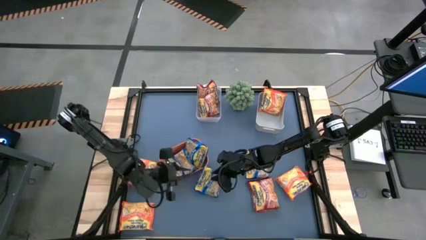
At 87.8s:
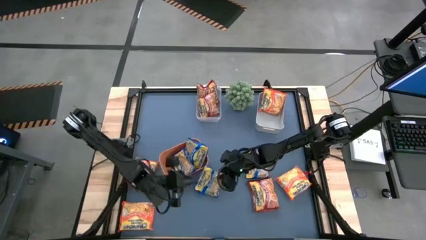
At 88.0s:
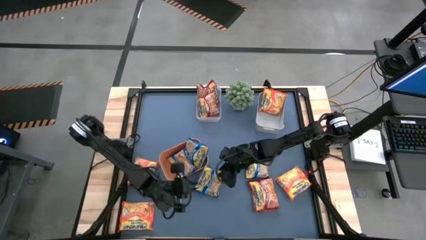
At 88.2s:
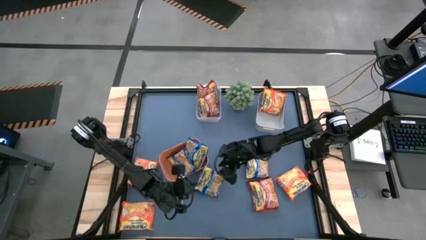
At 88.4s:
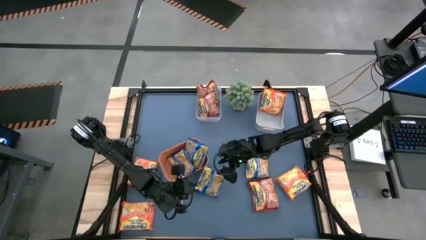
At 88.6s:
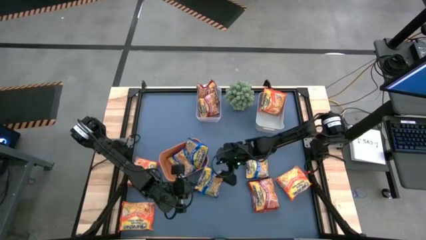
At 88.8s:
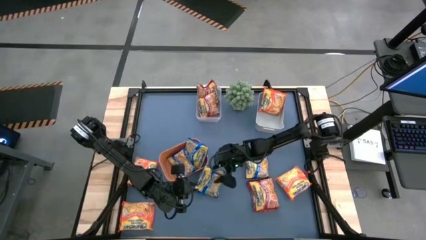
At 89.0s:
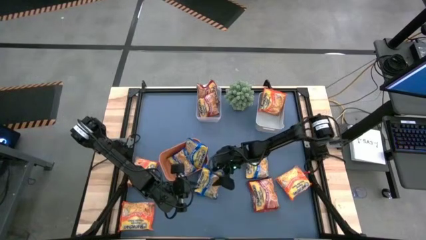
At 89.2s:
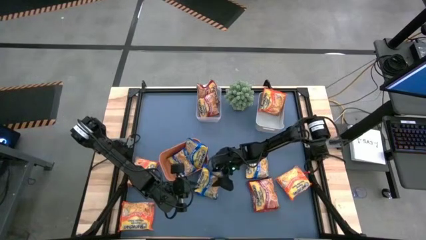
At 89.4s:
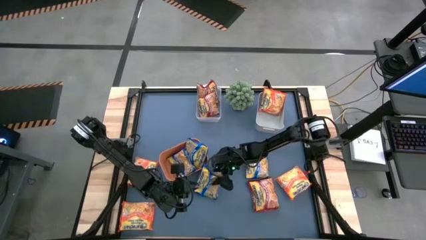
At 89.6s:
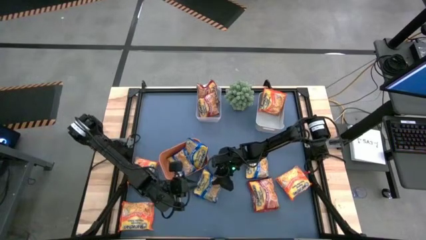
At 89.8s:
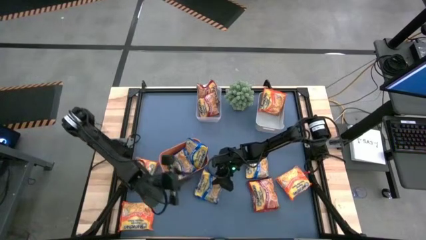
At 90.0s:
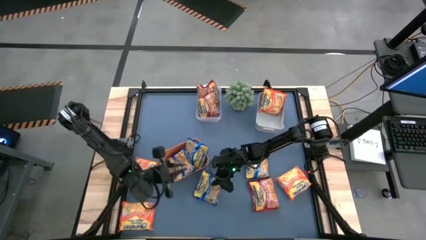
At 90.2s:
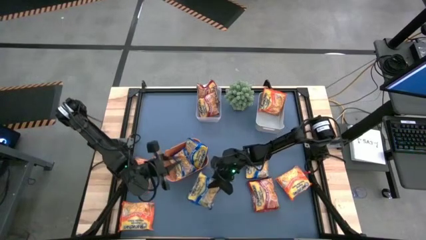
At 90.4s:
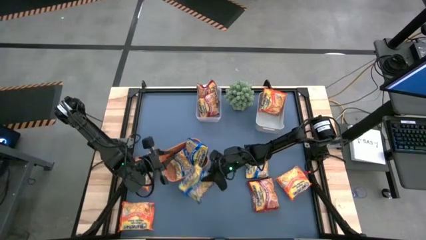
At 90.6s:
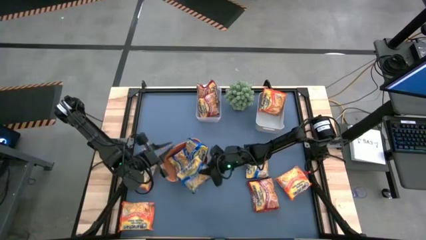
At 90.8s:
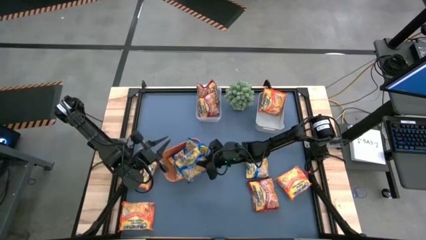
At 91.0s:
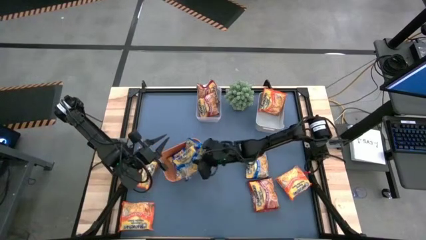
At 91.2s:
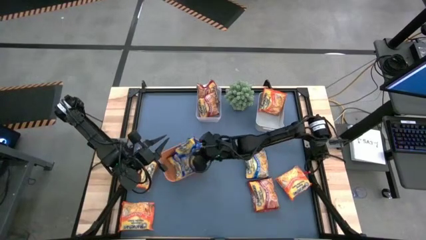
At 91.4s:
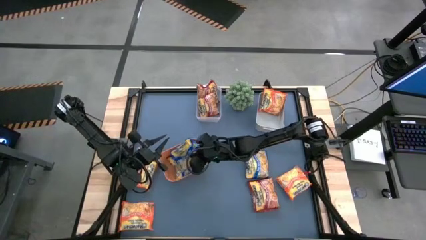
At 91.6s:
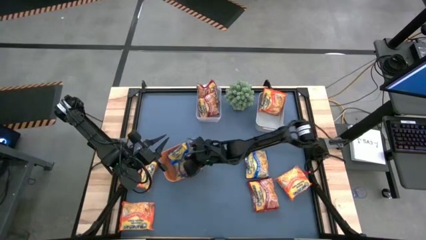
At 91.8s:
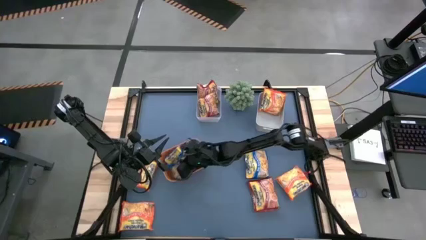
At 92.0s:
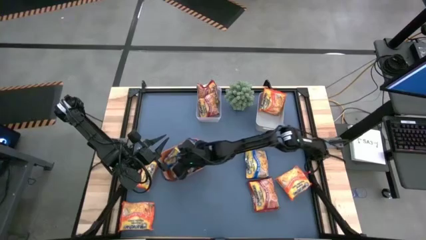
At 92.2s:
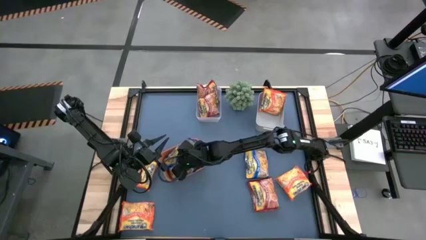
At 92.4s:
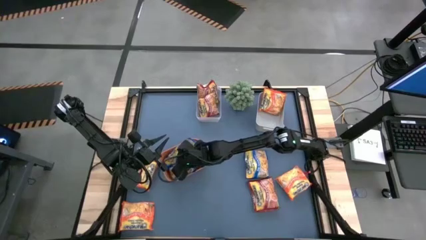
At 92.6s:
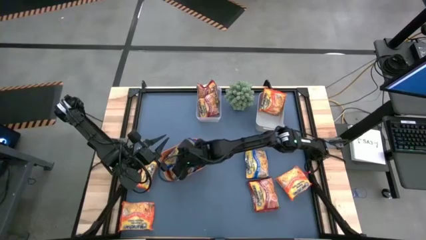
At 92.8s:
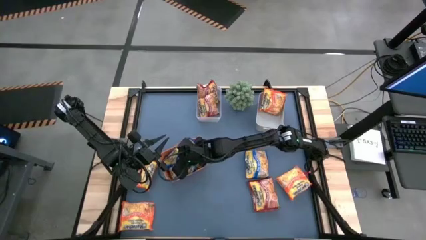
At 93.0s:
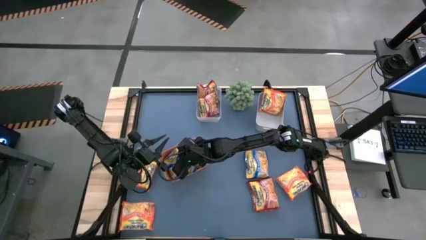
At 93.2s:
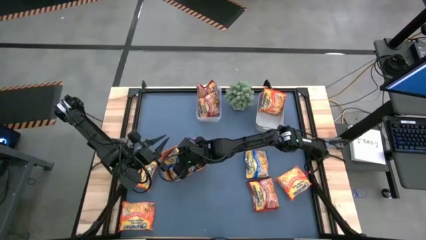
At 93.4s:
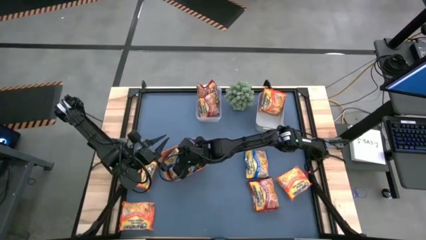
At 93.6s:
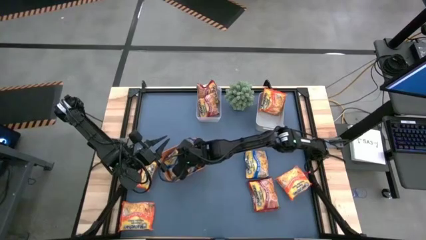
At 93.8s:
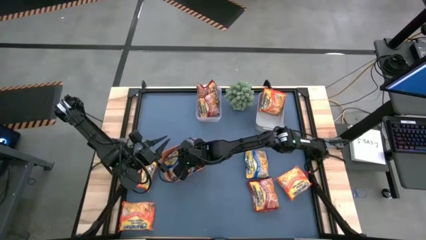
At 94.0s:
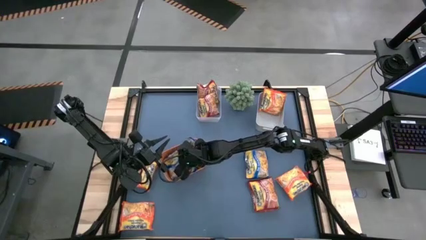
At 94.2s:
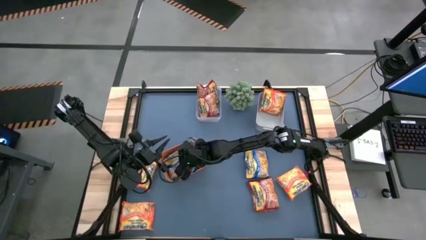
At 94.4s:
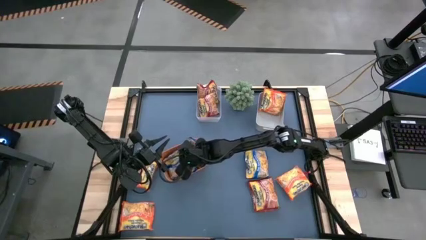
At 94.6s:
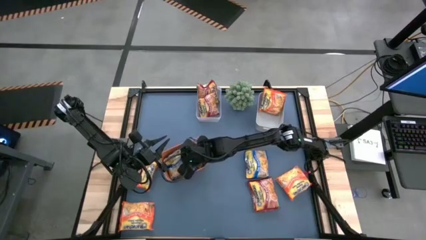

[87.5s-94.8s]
Task: Sort Maruchan noodles
Put the blue noodle pack into the orange bin

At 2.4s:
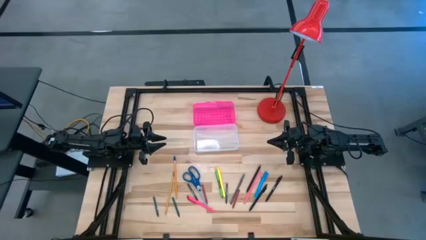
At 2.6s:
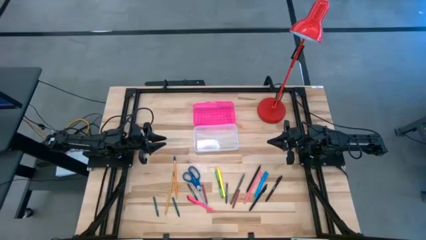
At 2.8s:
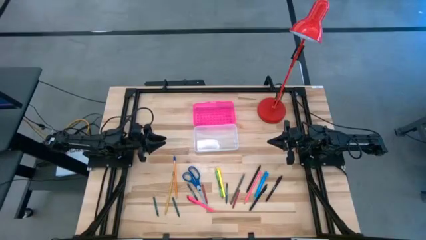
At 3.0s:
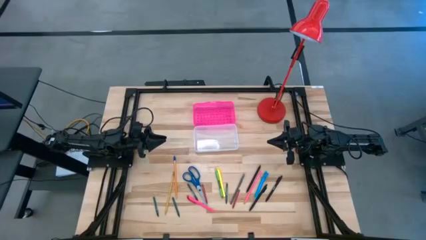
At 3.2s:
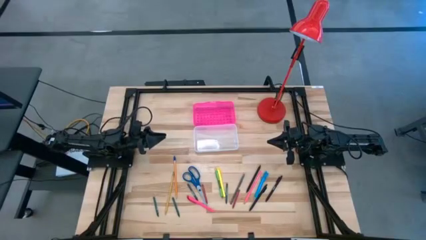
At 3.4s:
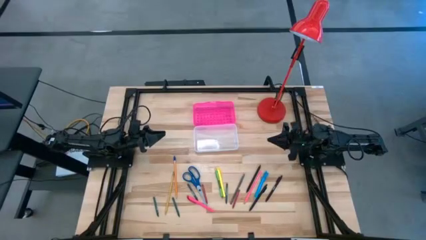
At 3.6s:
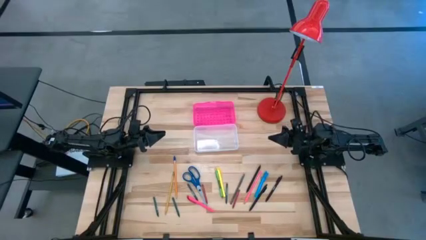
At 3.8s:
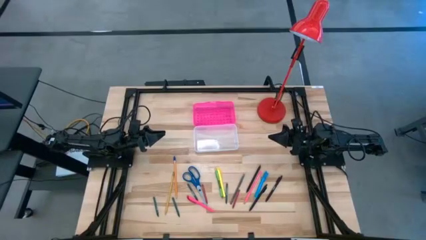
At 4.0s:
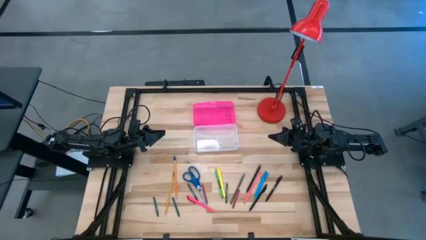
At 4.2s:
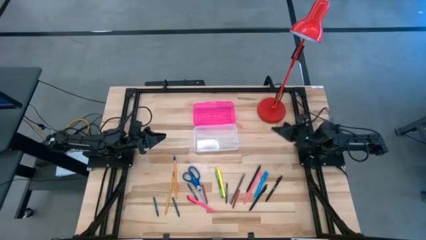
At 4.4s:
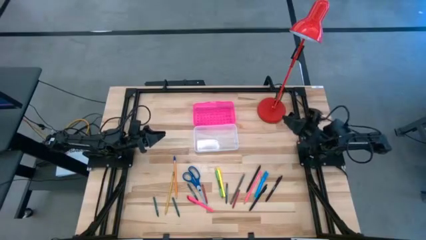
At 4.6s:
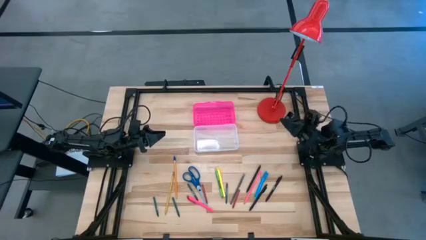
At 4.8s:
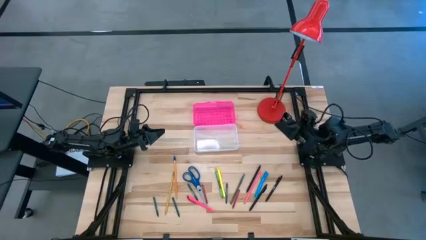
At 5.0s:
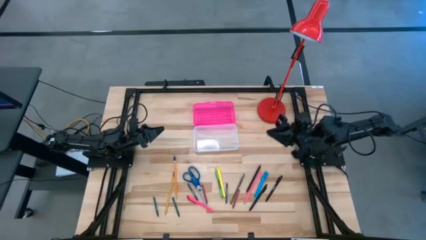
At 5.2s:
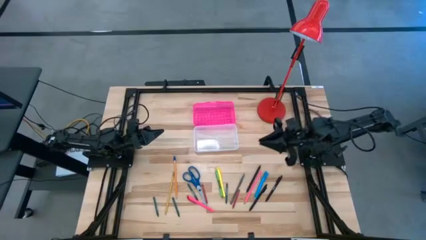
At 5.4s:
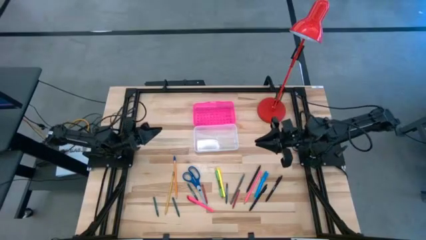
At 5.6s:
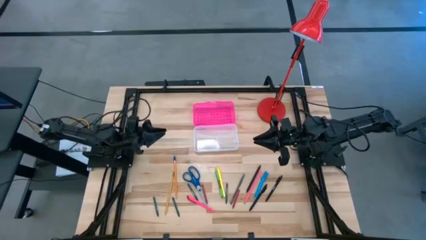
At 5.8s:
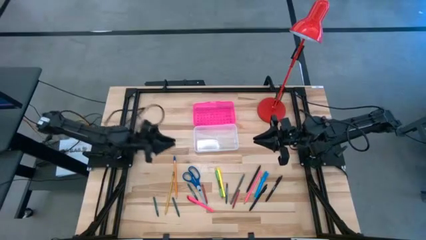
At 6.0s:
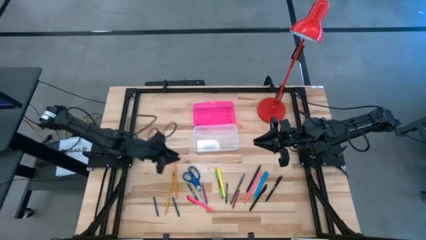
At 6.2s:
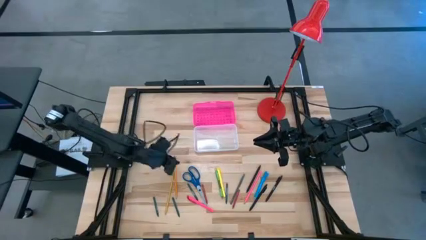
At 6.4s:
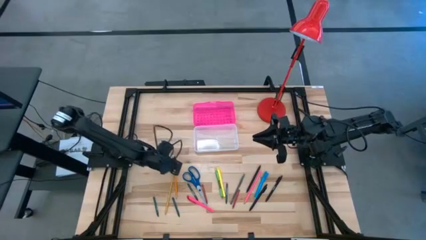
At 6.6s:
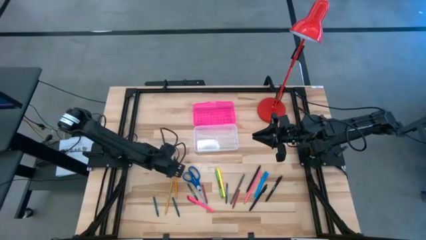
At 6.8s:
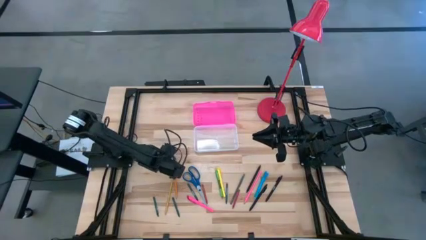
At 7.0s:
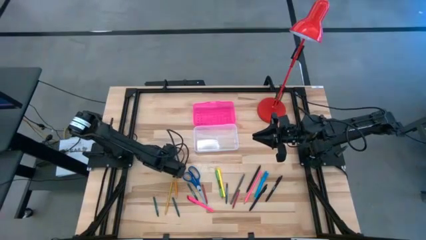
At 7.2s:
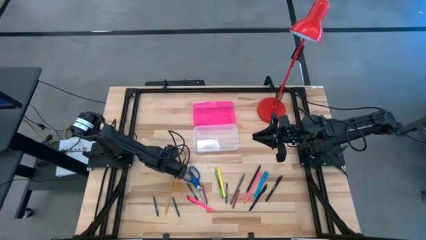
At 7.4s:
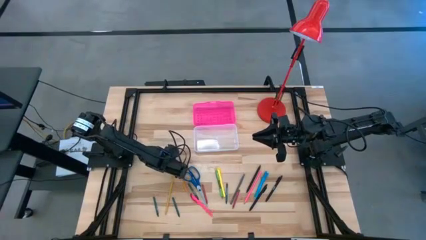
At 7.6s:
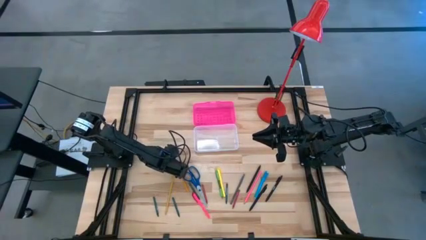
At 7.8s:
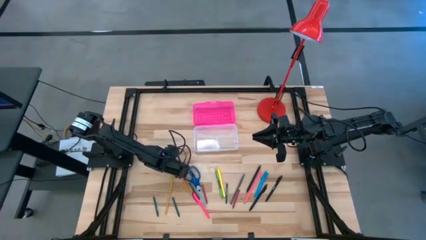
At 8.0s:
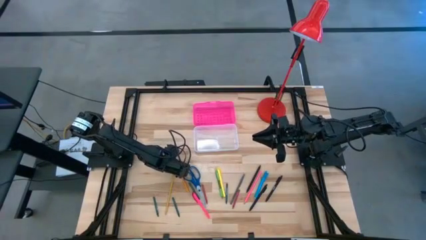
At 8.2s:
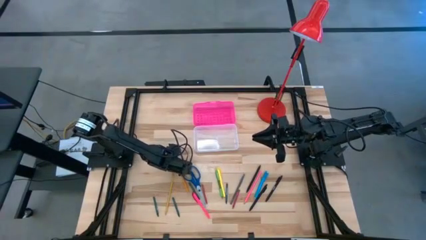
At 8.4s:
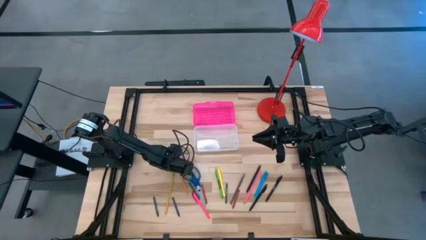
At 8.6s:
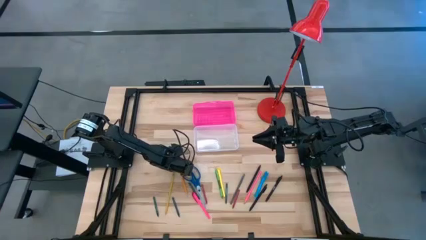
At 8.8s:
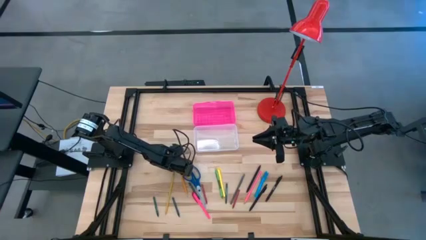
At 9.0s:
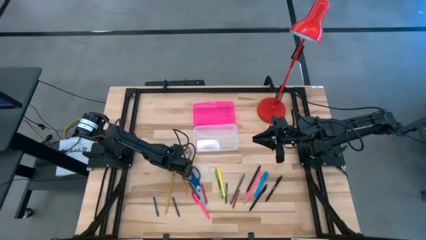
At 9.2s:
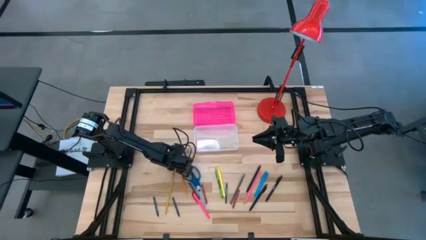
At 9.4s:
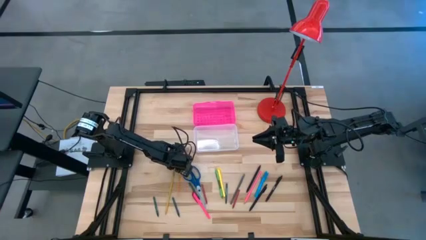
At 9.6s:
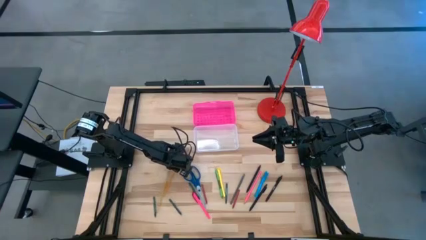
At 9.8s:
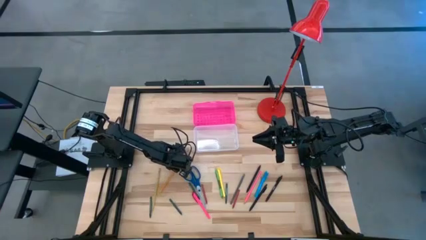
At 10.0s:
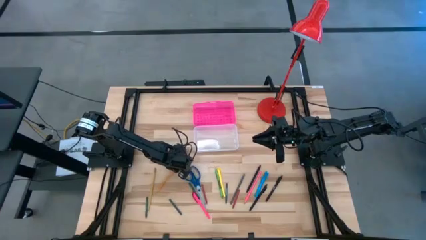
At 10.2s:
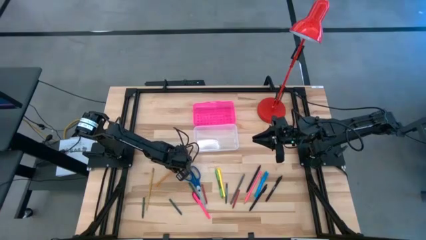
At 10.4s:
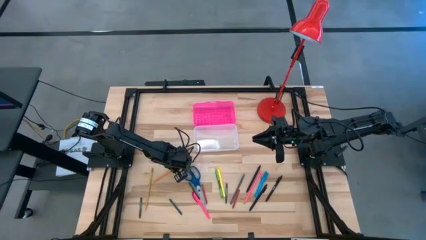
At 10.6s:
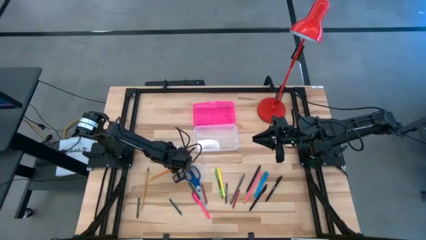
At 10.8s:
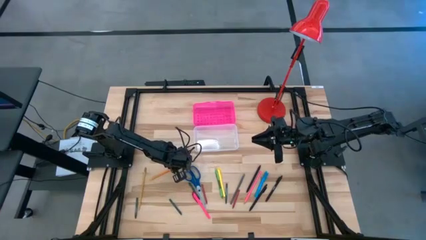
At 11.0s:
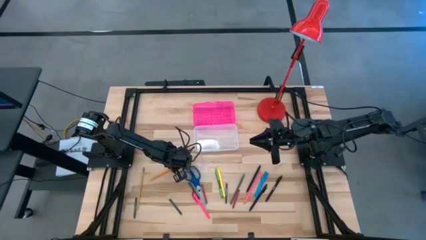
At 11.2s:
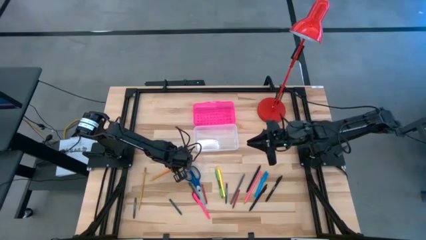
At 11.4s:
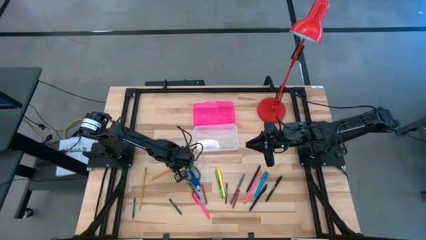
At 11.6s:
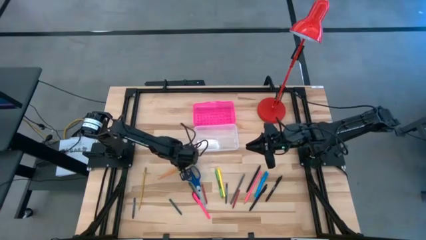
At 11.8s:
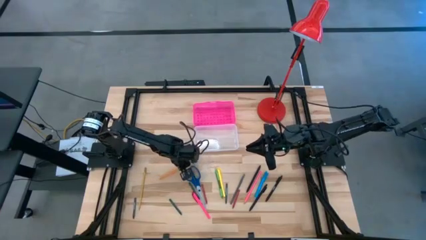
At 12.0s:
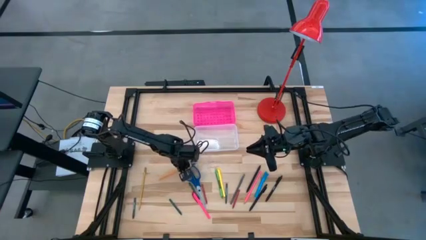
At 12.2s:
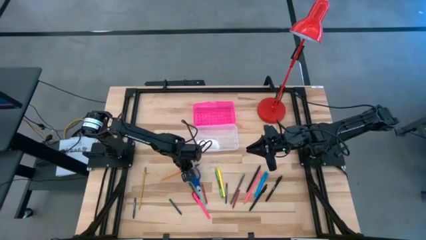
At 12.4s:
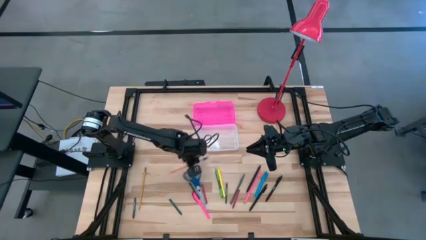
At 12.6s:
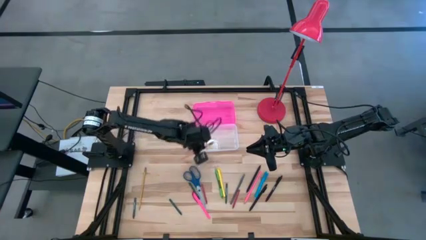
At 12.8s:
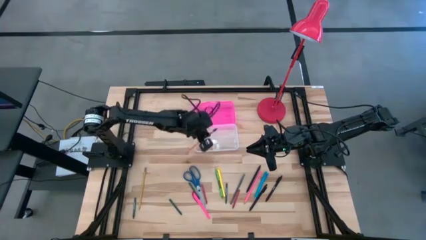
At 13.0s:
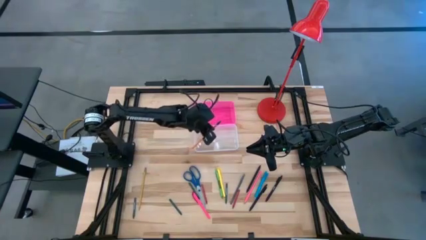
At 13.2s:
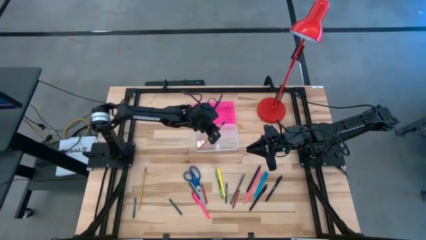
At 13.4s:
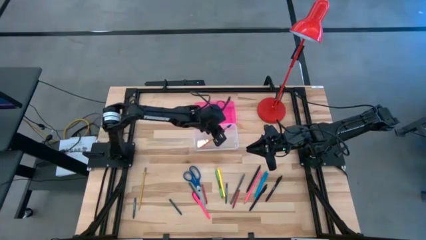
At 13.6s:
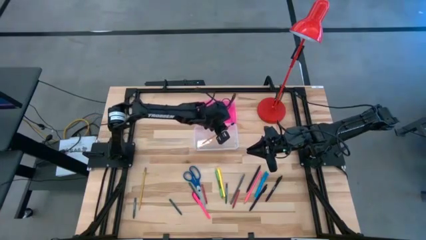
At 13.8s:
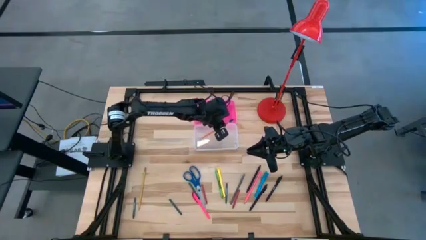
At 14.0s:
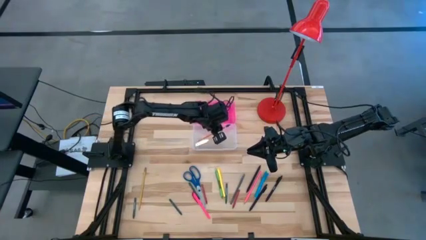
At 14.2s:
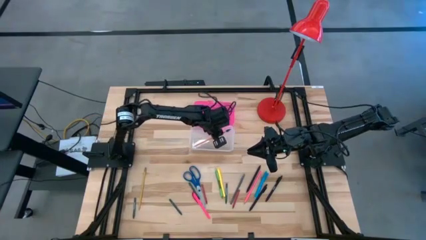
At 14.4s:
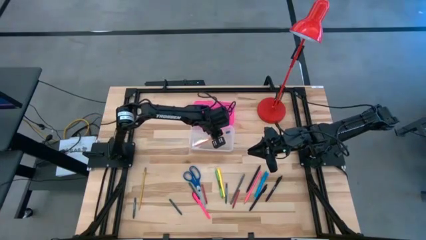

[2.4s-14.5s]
Task: Pick & place school supplies into a supply box
Put the orange pencil into the pink supply box
